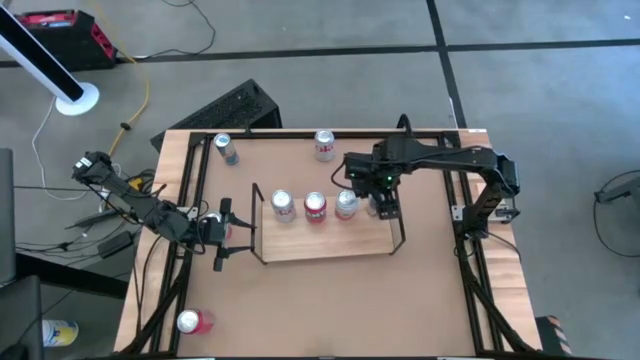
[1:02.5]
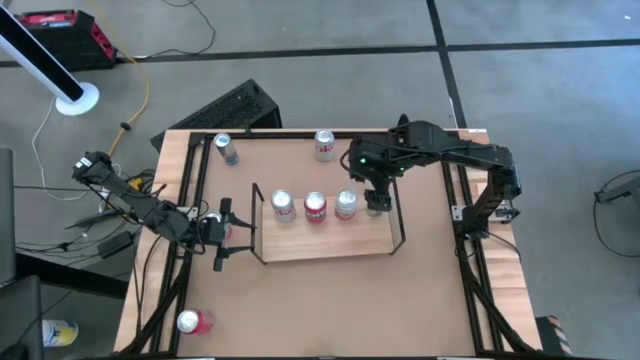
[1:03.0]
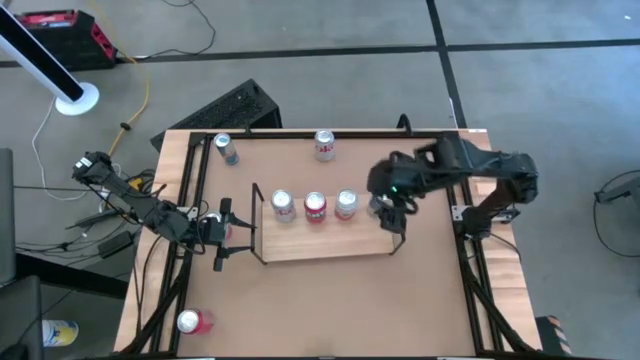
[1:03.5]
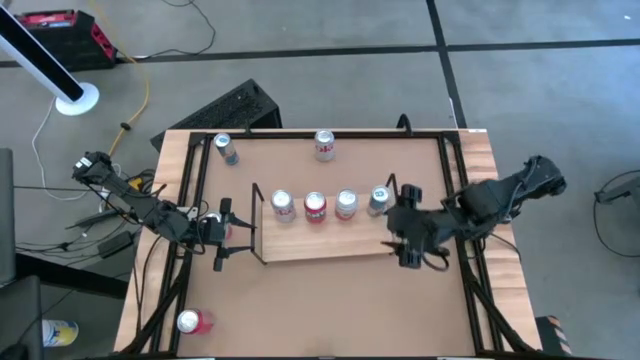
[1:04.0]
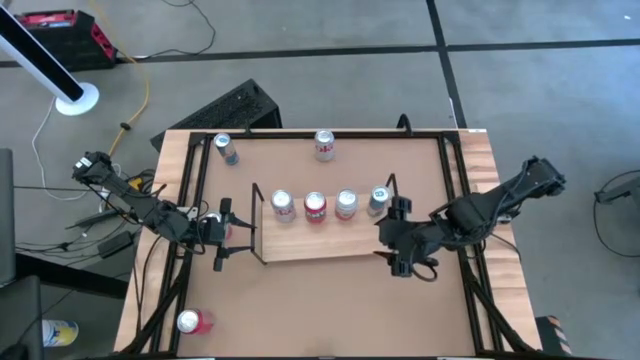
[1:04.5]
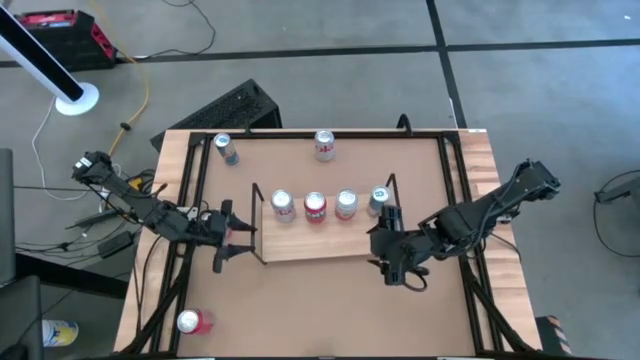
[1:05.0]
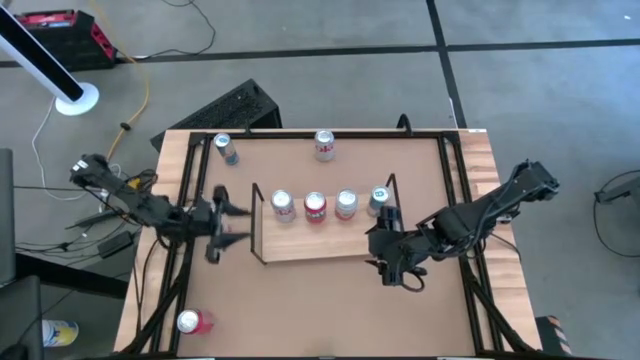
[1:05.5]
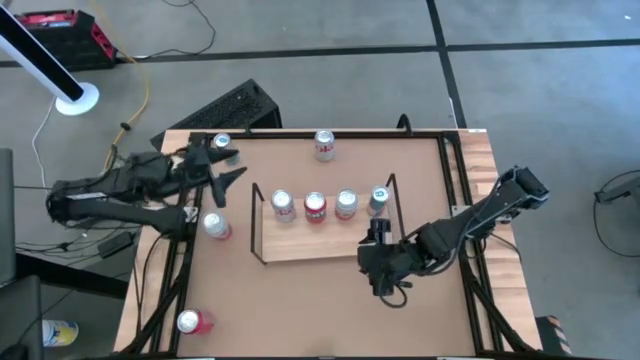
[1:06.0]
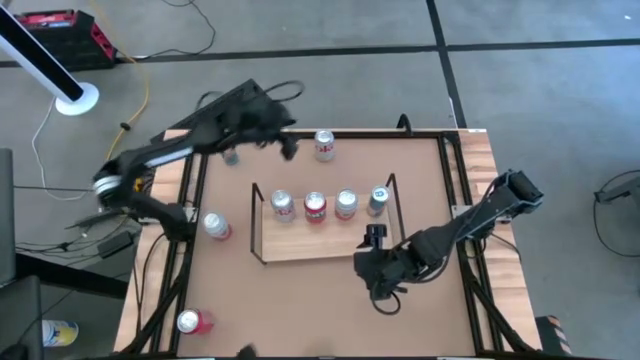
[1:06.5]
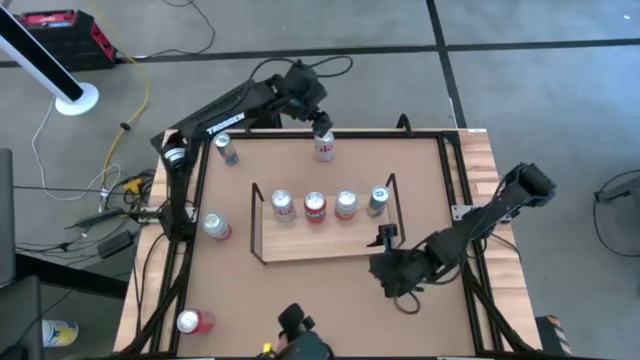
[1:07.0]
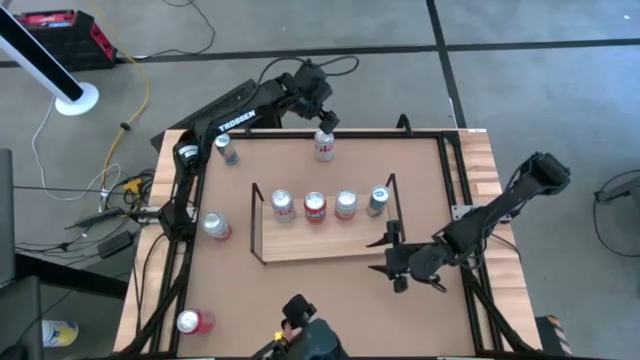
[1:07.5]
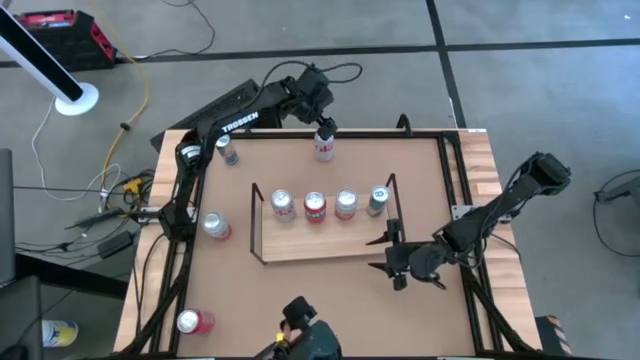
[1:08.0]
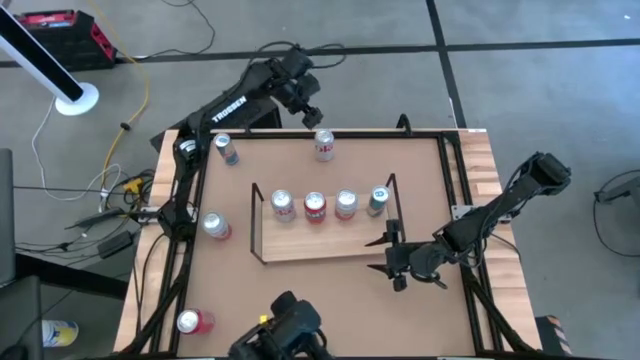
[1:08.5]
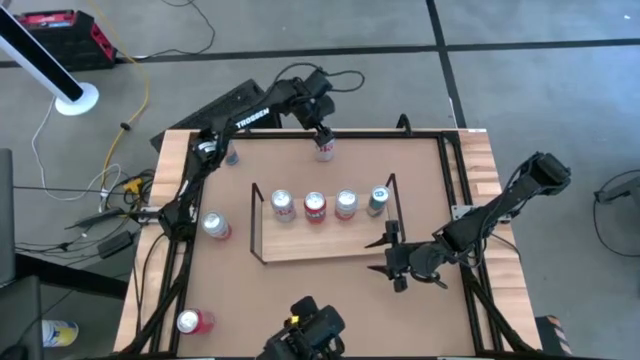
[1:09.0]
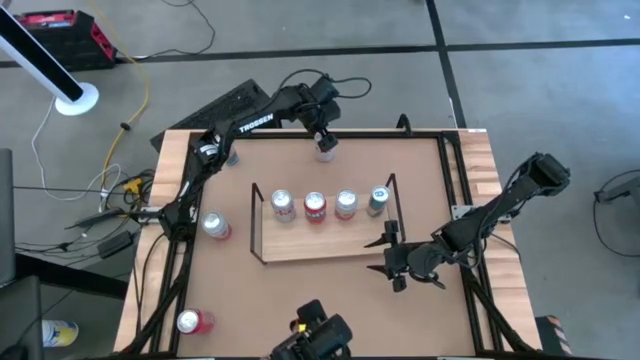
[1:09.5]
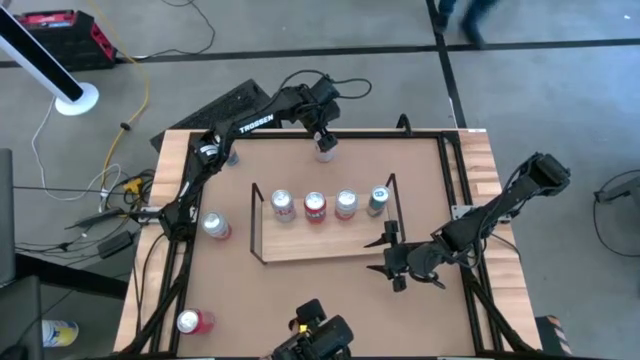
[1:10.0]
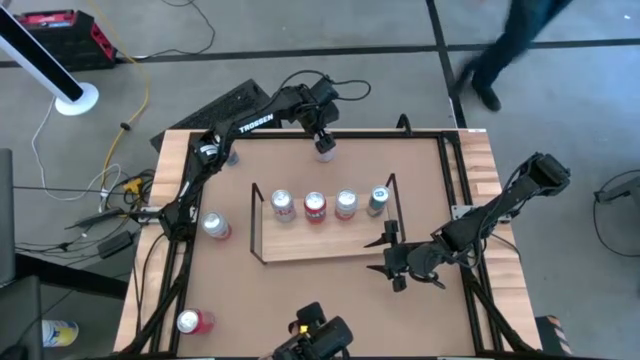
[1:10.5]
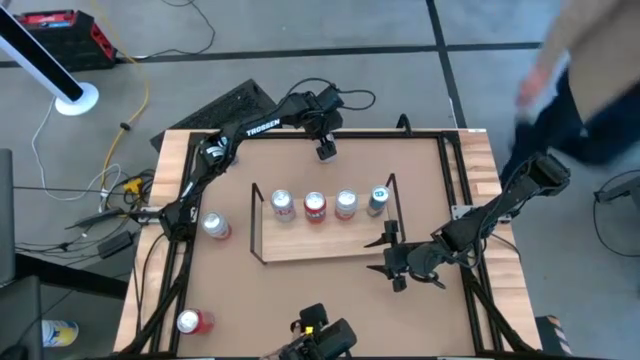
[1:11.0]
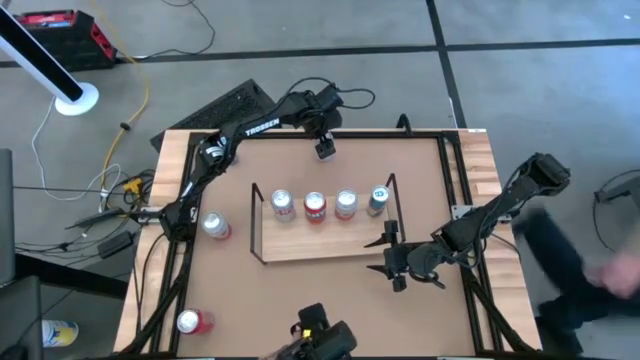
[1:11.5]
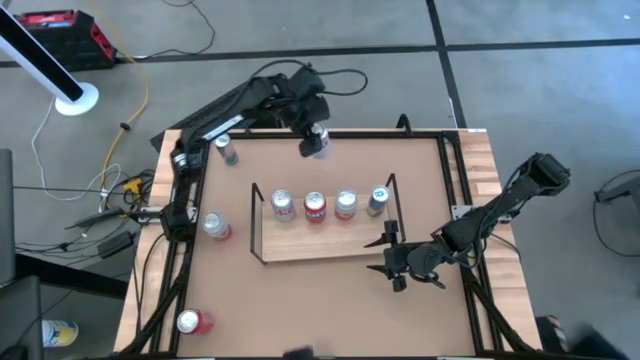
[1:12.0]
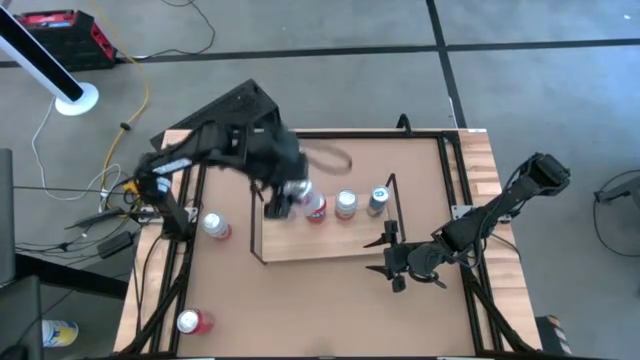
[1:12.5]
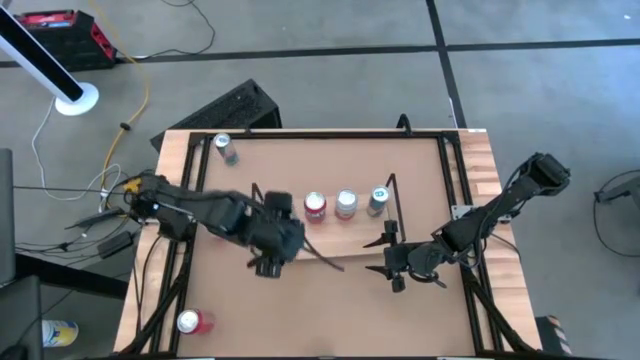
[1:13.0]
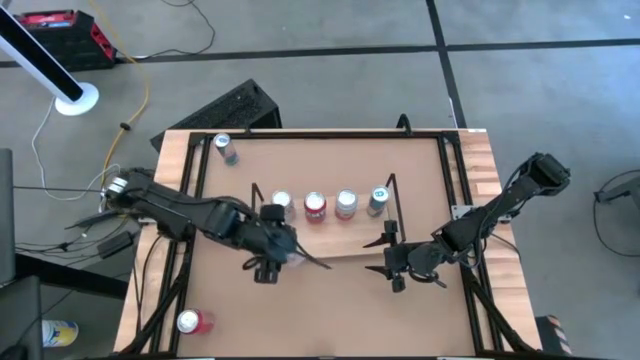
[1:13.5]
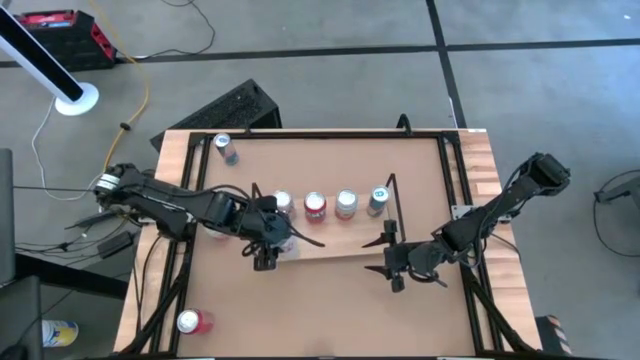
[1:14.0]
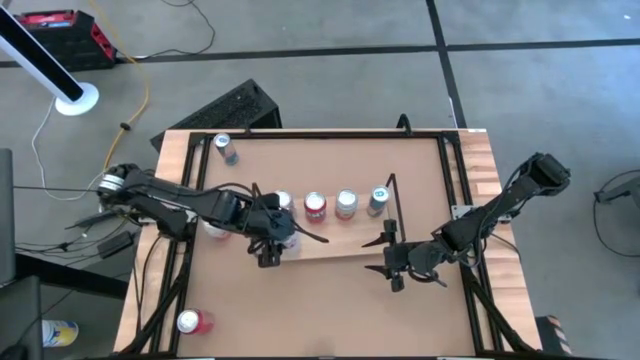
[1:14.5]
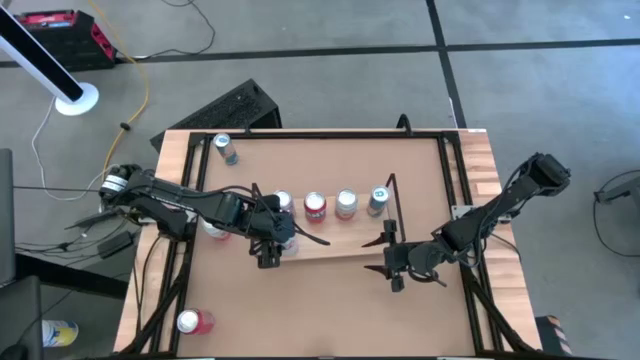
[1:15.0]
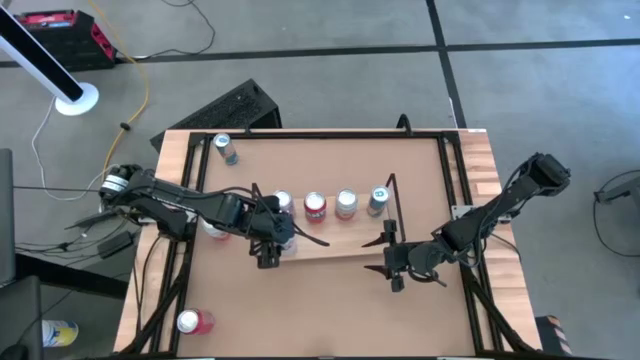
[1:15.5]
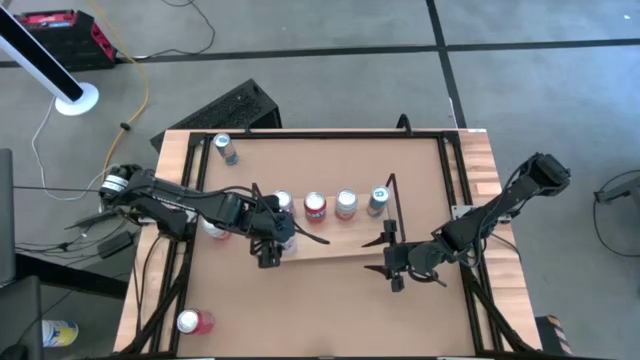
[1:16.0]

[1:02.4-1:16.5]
Task: Place canned beverage on shelf
Put the silver soda can on the shelf

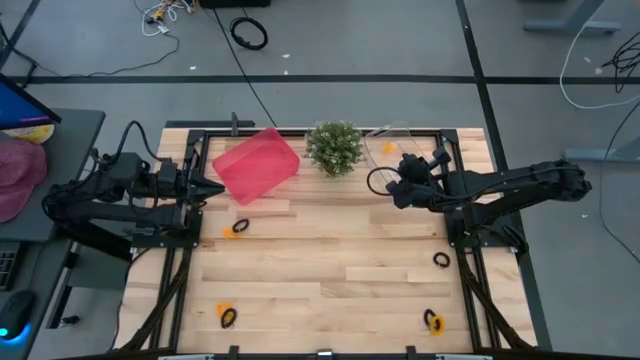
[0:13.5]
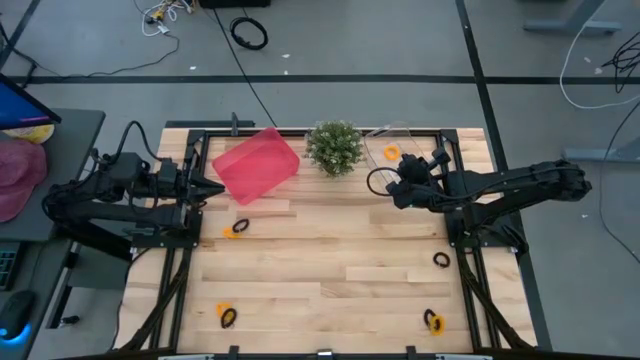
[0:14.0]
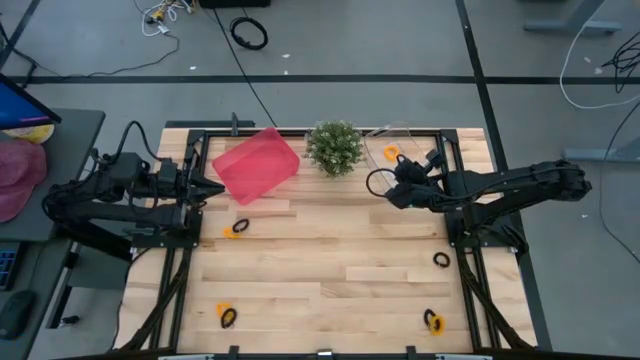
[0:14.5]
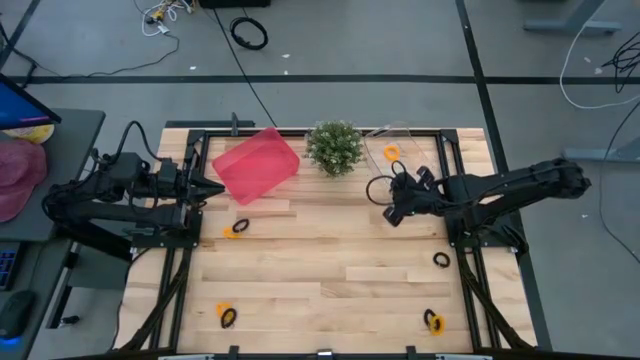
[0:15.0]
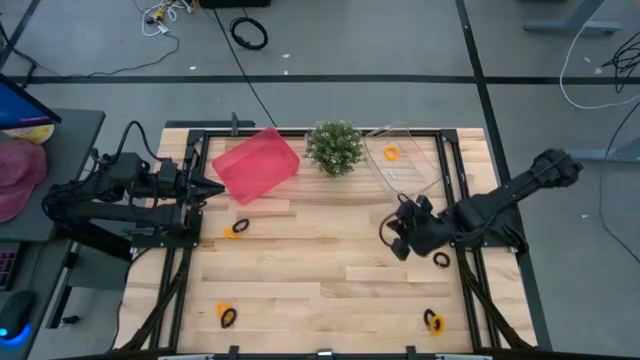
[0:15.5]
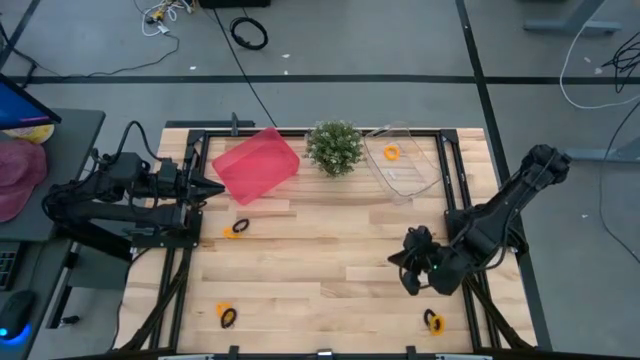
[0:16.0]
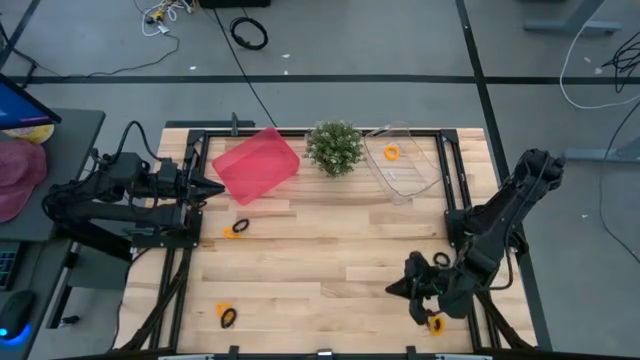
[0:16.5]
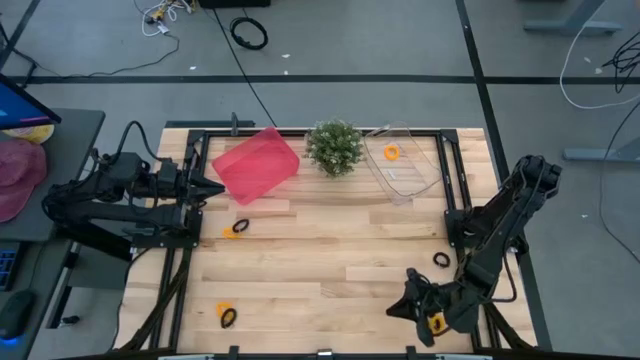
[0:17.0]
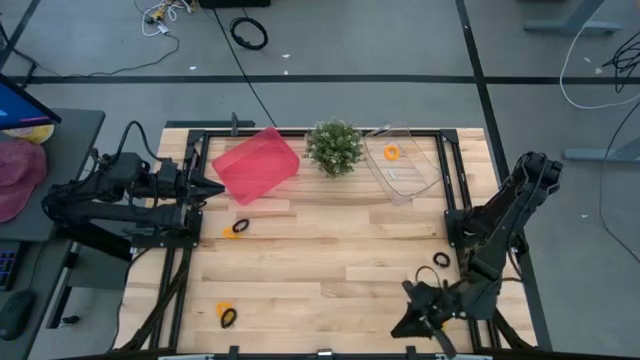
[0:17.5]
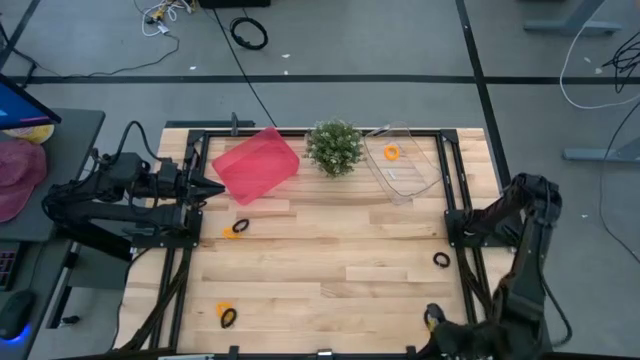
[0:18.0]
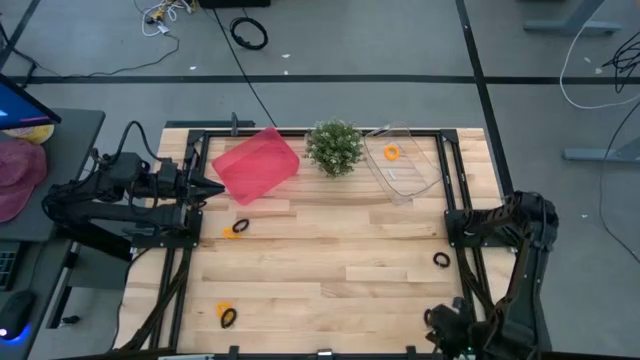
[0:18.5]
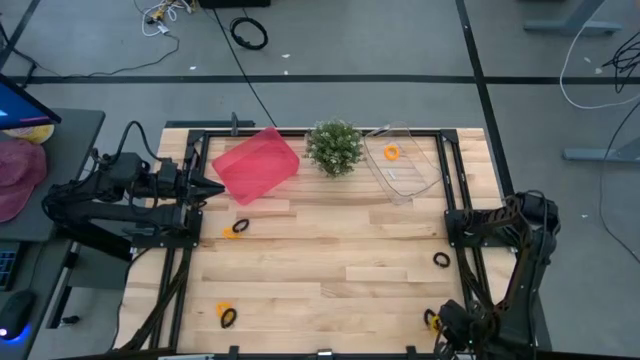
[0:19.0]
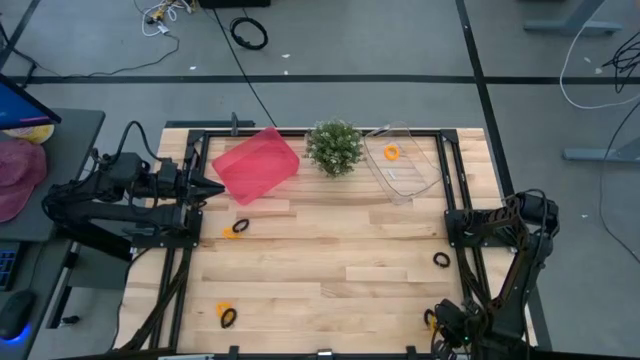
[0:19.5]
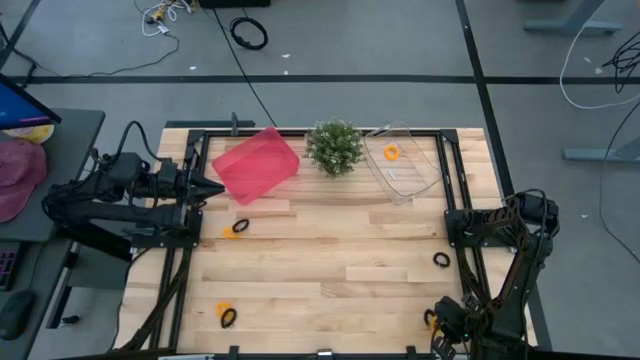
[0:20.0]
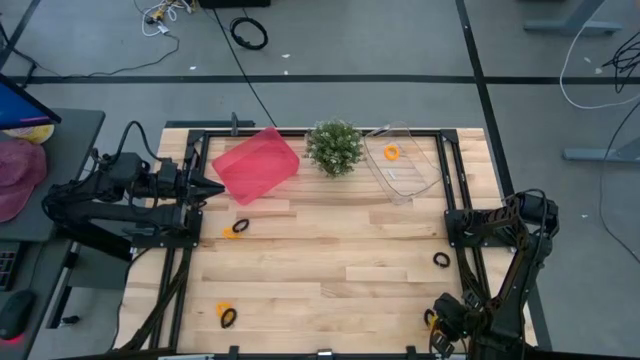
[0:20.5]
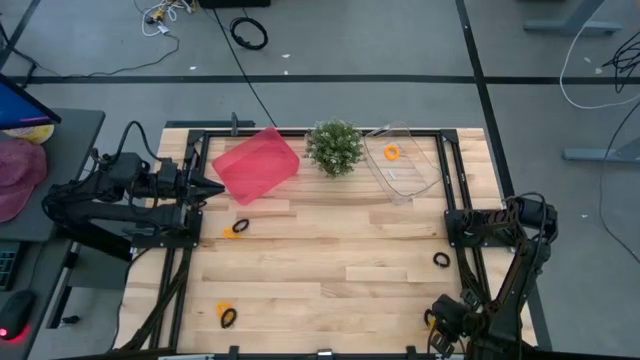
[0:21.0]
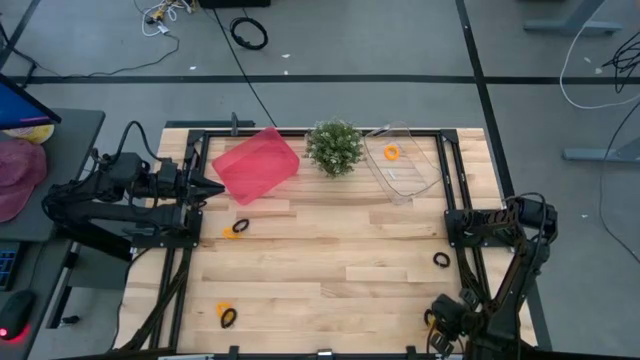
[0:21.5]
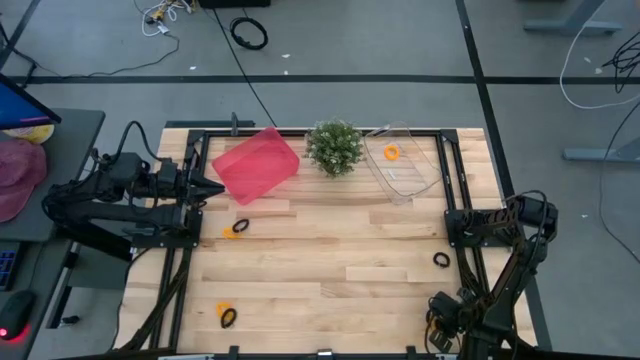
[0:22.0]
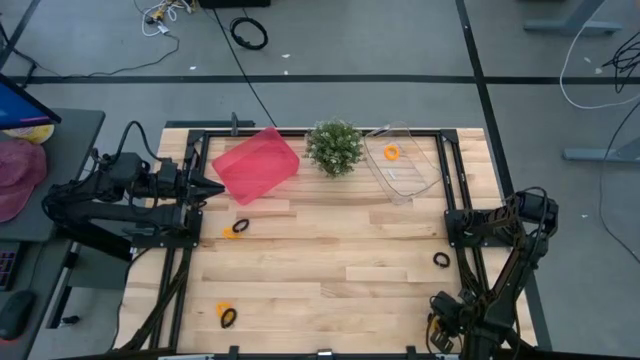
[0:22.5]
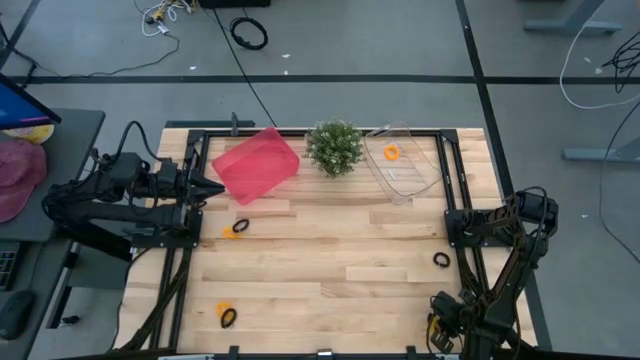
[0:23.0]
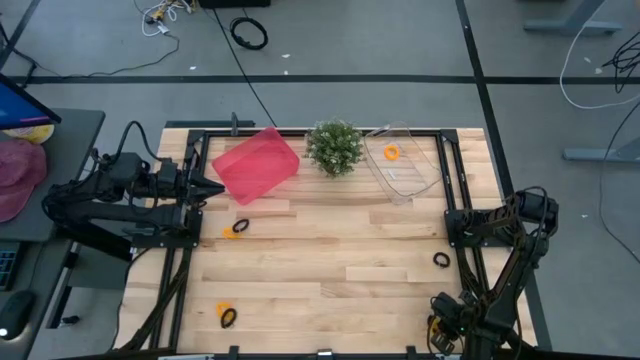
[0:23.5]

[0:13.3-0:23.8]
Task: Sort spring keychains
Put the yellow spring keychain into the transparent bin
